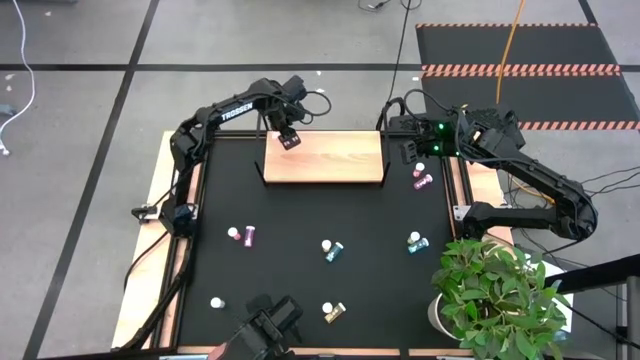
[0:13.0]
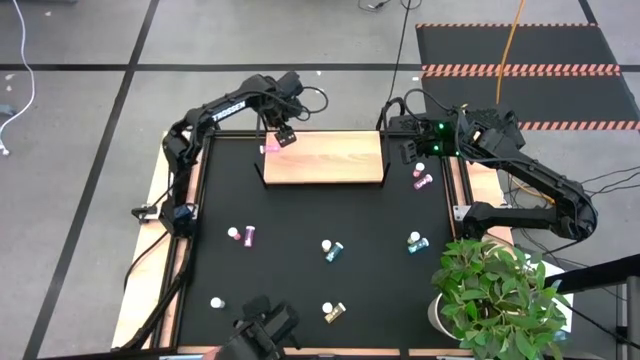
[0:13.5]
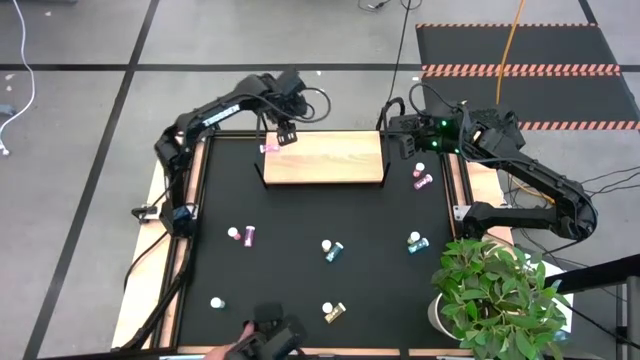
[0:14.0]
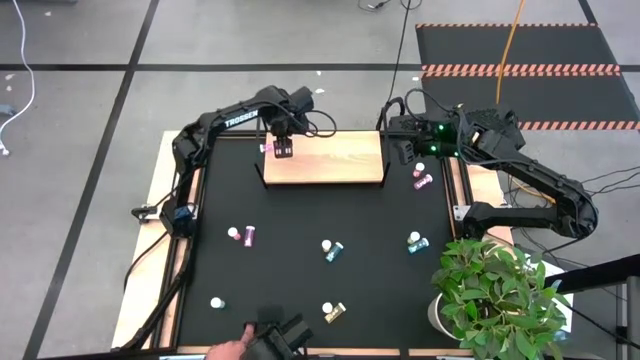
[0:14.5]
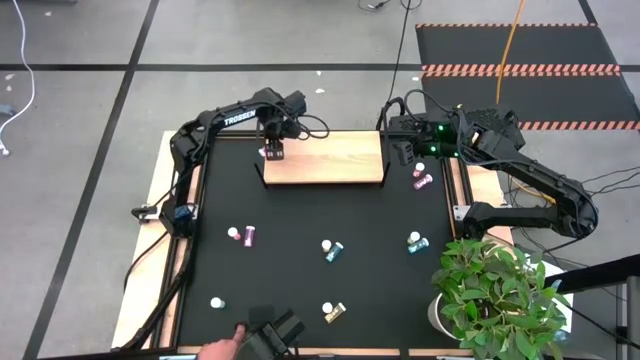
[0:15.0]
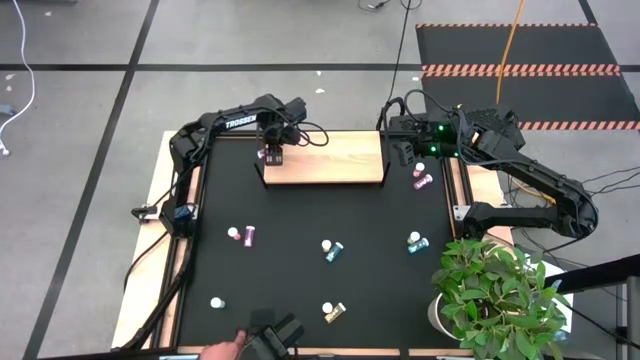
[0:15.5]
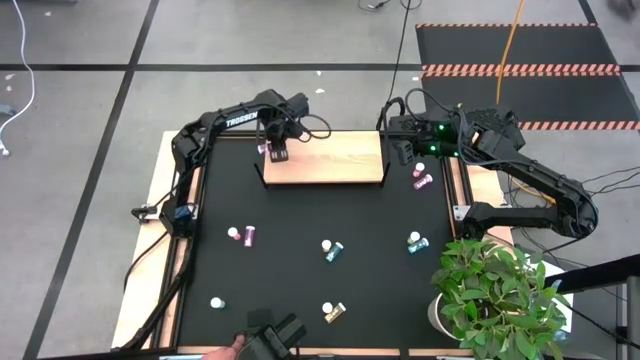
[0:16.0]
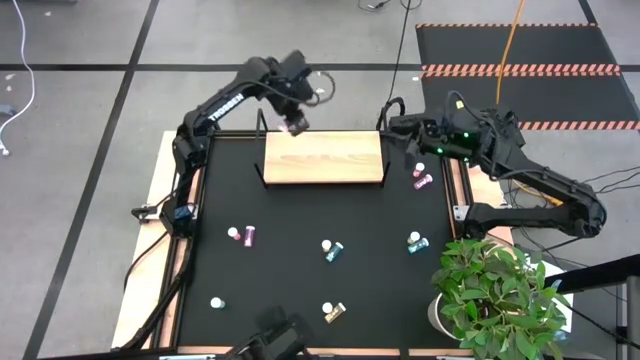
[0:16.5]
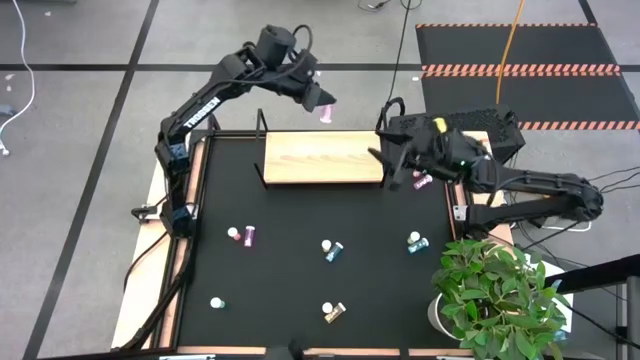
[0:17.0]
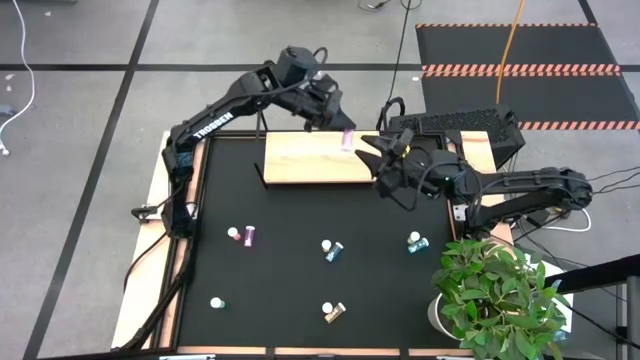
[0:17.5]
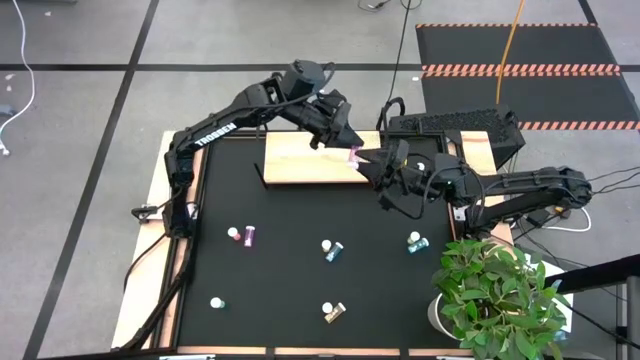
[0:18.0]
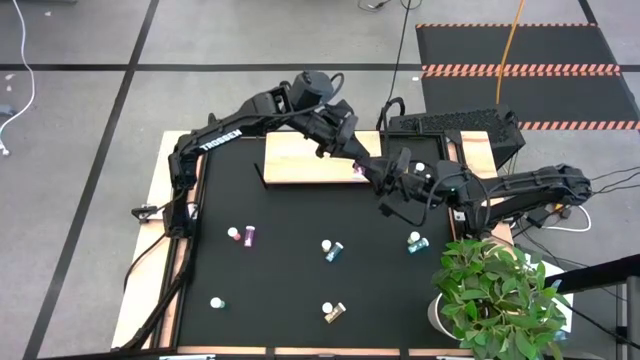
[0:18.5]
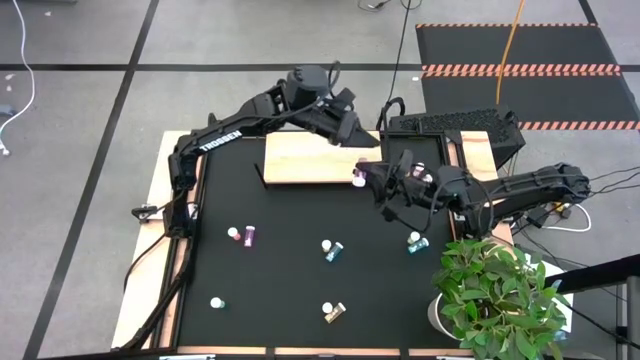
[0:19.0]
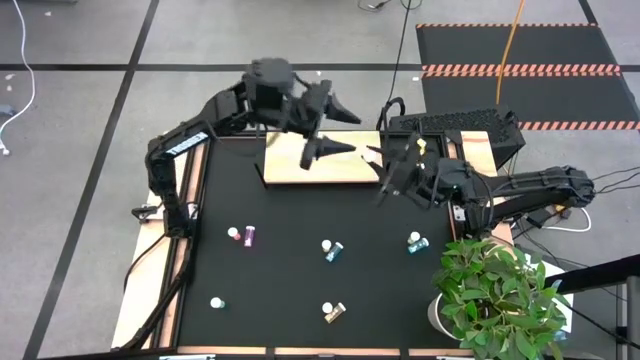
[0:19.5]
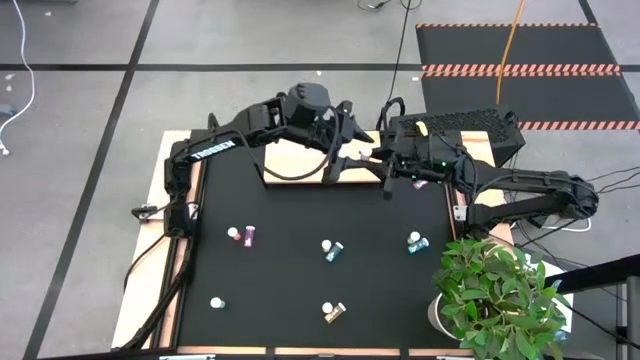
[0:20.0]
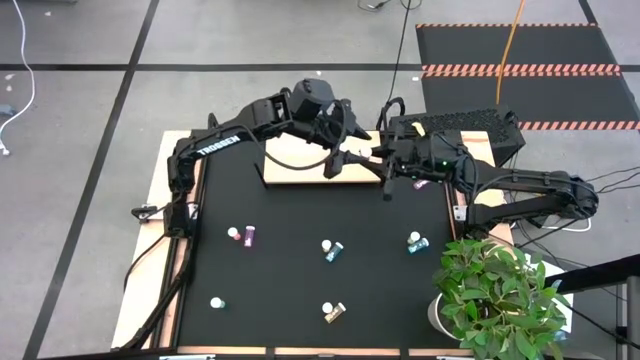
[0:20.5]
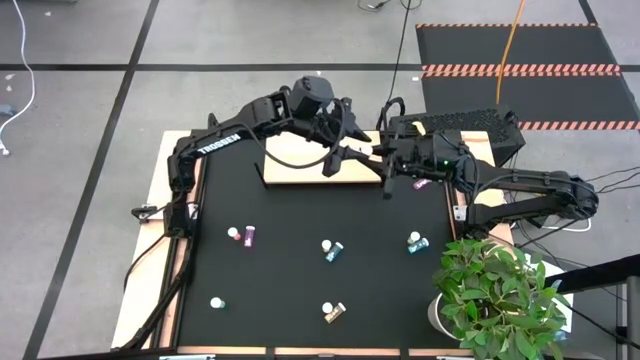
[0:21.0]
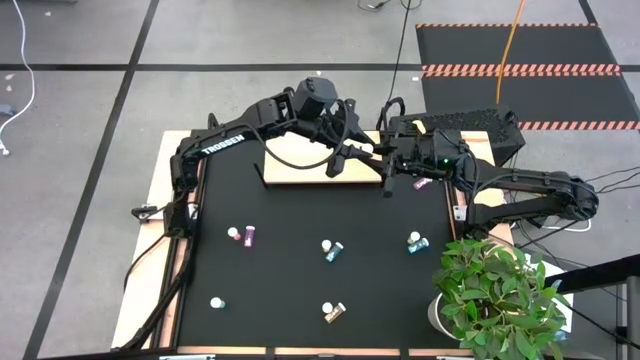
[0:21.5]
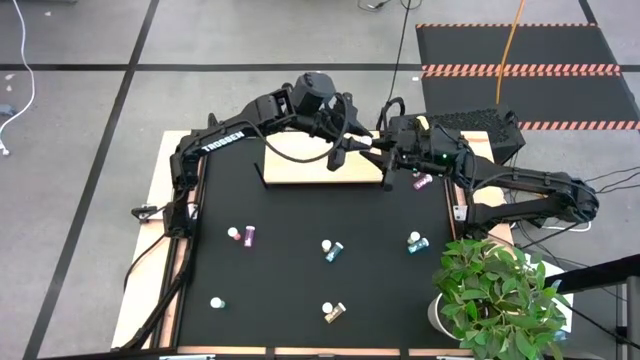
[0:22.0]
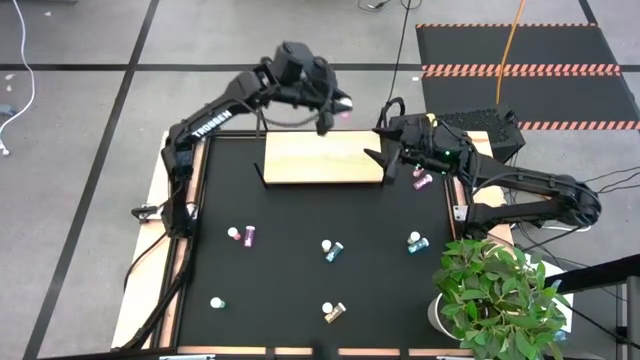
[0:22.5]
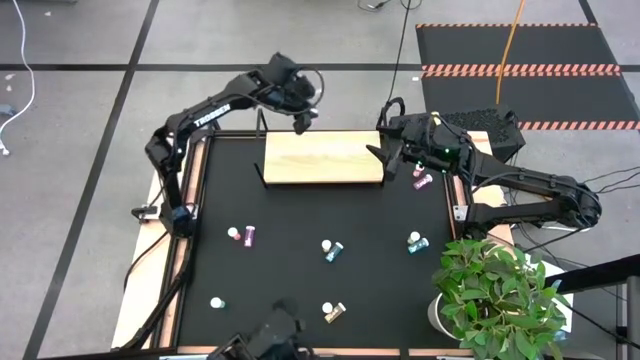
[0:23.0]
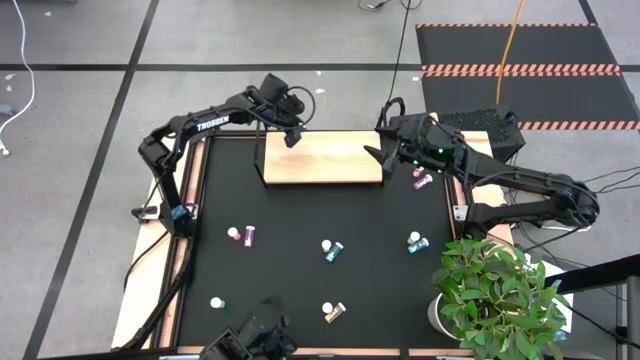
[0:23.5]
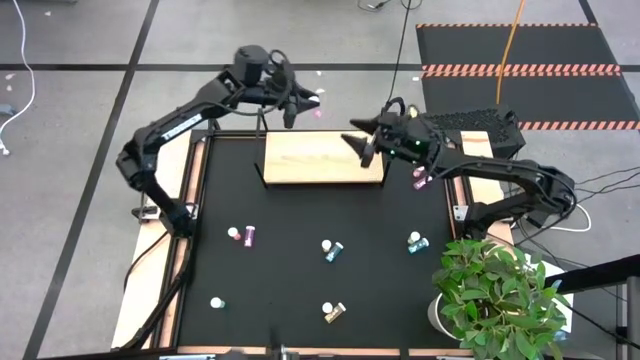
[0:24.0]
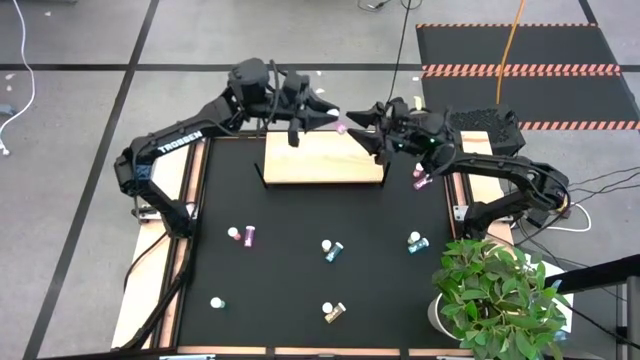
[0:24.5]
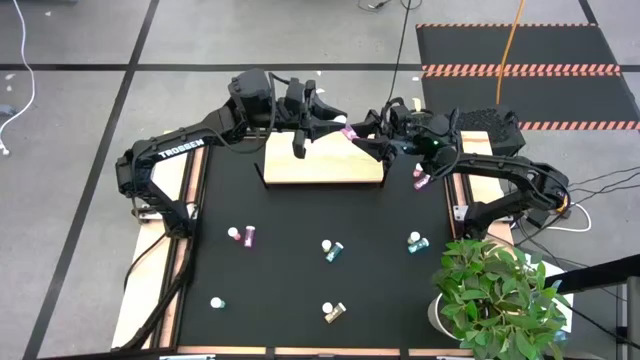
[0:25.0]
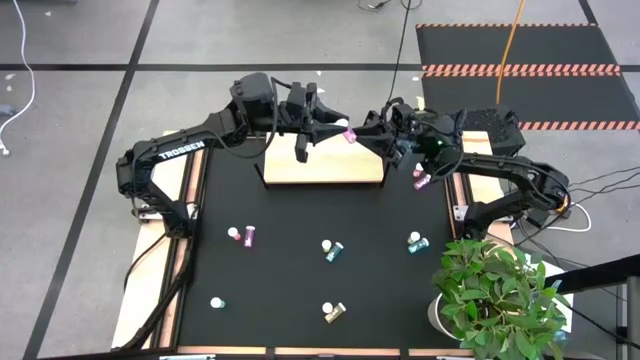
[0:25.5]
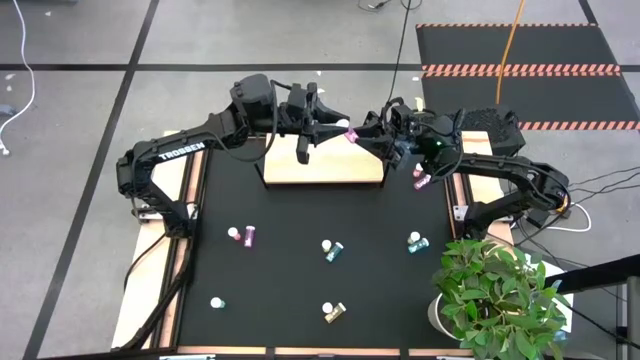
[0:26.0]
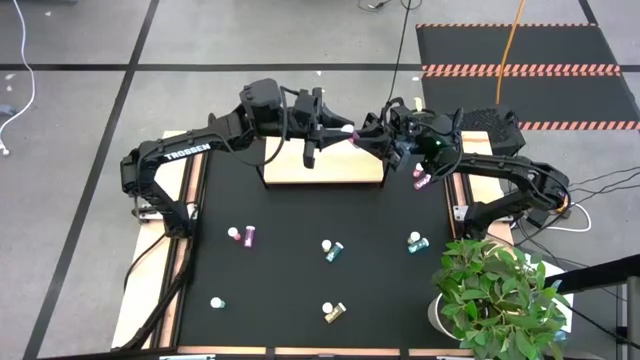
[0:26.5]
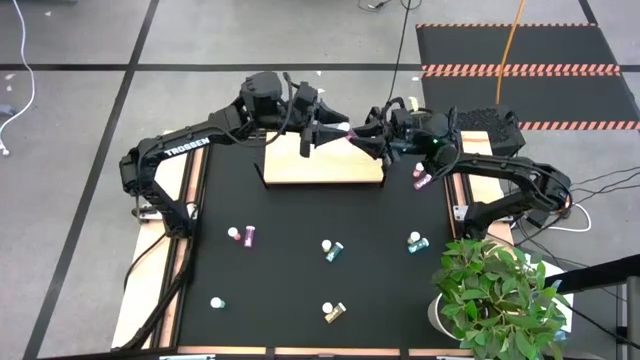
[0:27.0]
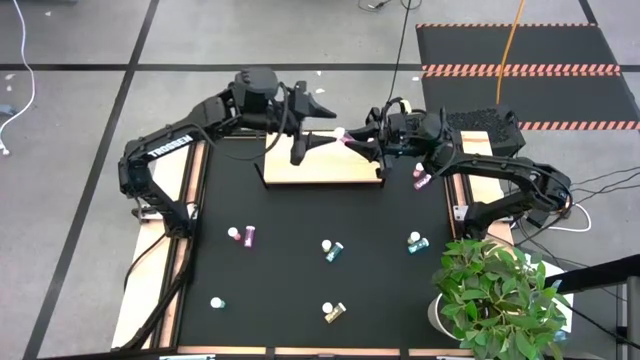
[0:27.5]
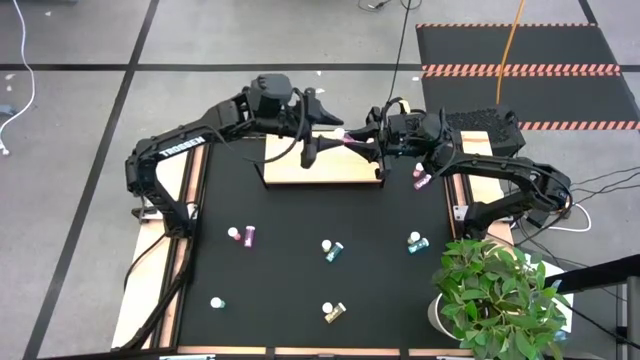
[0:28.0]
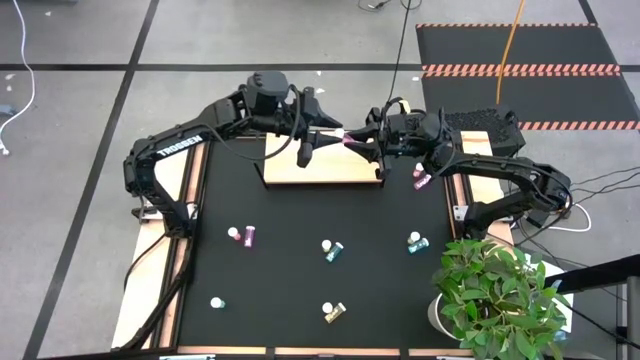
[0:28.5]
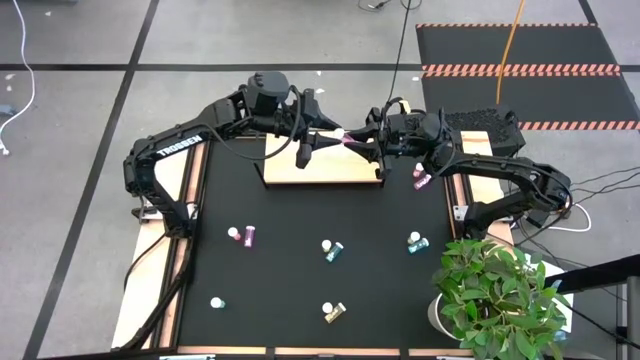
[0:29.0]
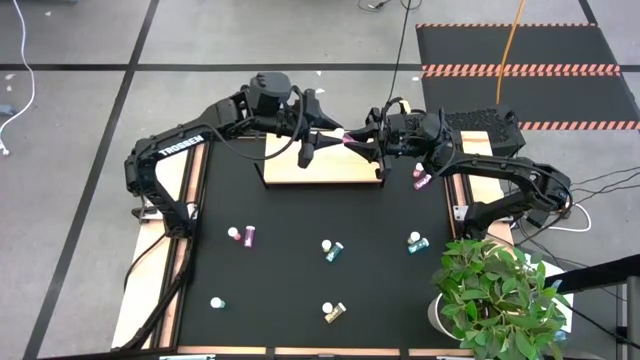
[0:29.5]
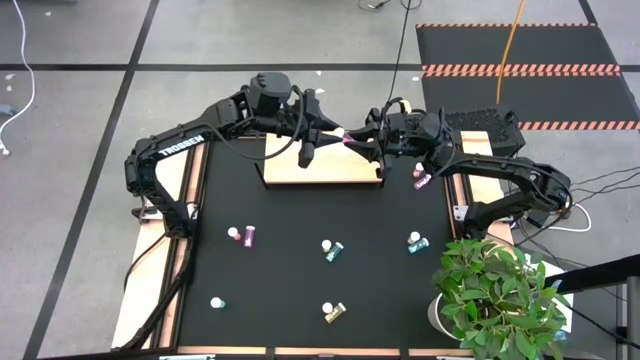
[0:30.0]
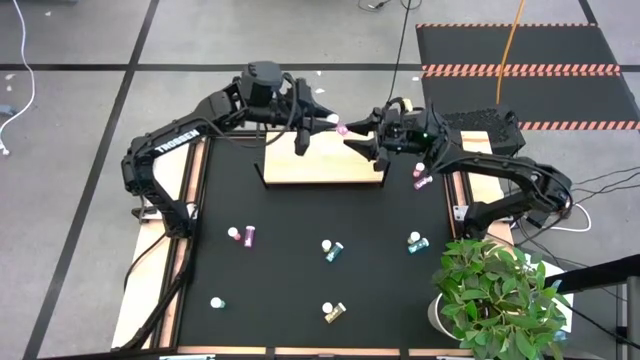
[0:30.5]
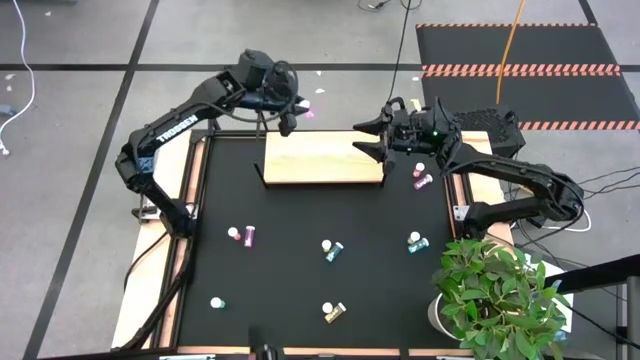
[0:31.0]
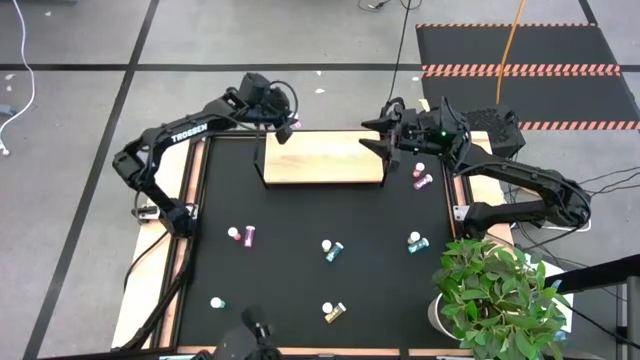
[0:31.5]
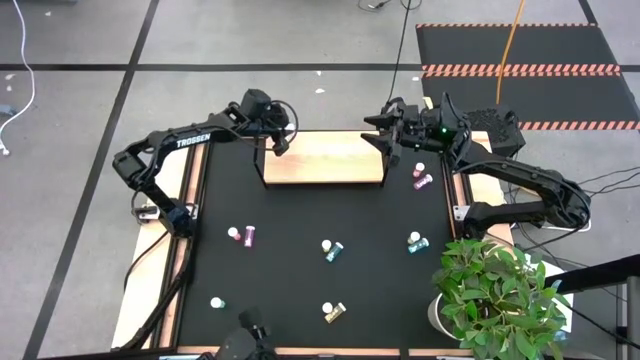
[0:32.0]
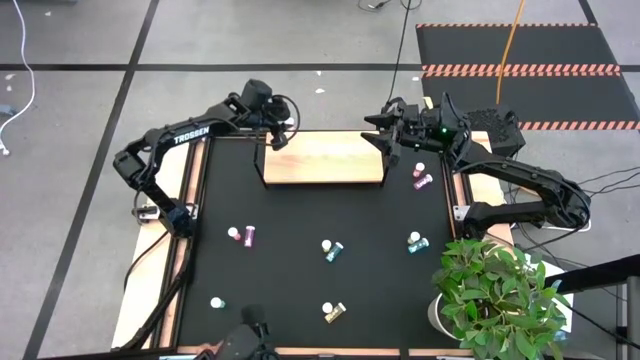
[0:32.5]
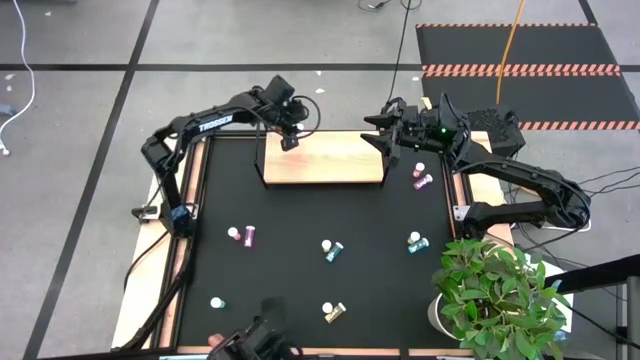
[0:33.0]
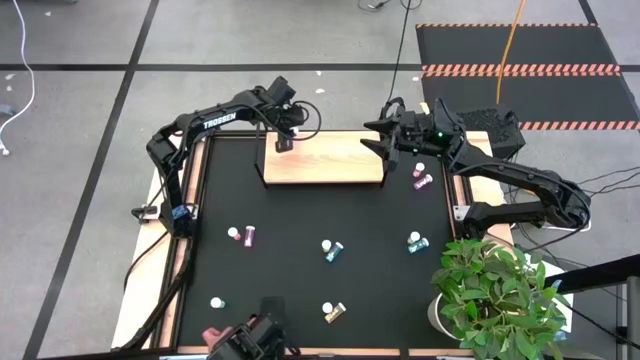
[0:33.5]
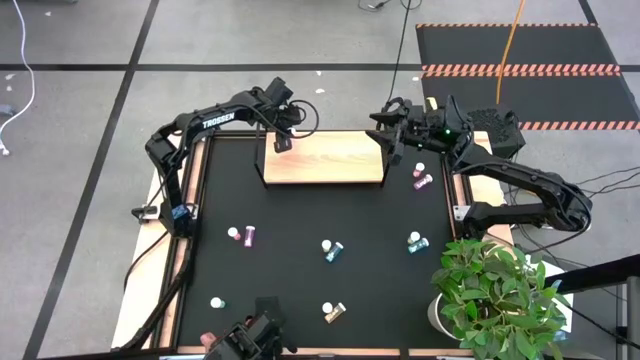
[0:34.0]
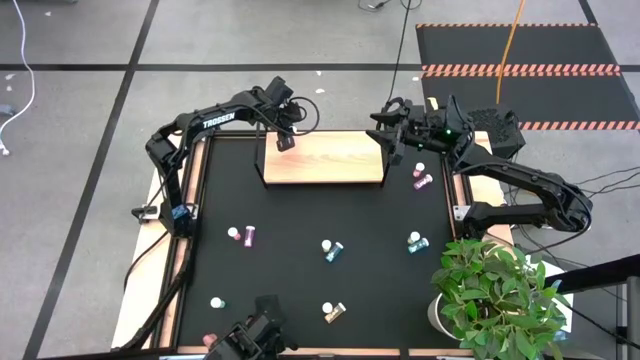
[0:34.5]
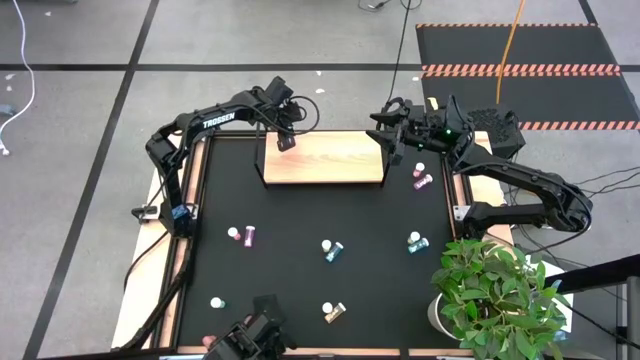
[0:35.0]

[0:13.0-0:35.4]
Task: Pick and place medicine bottles onto shelf by color
Put the top left pink pill bottle on the shelf
